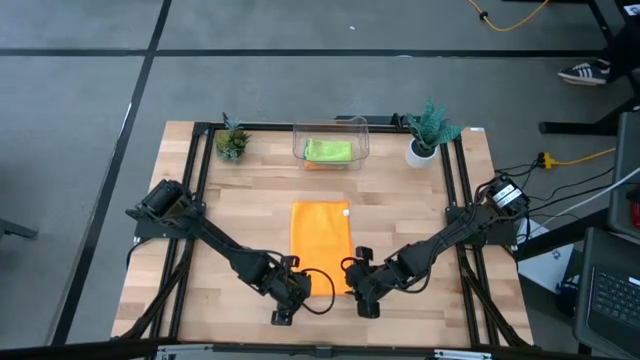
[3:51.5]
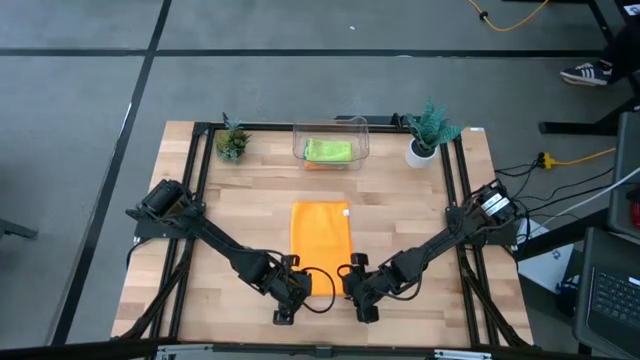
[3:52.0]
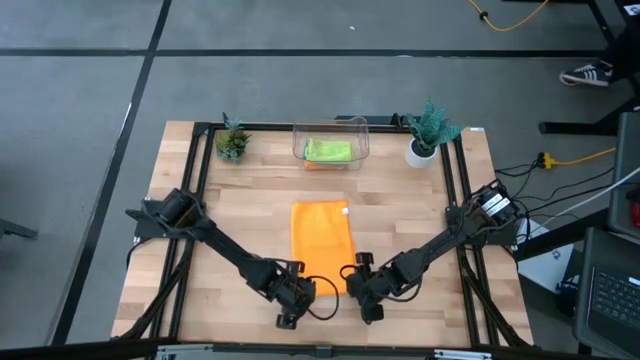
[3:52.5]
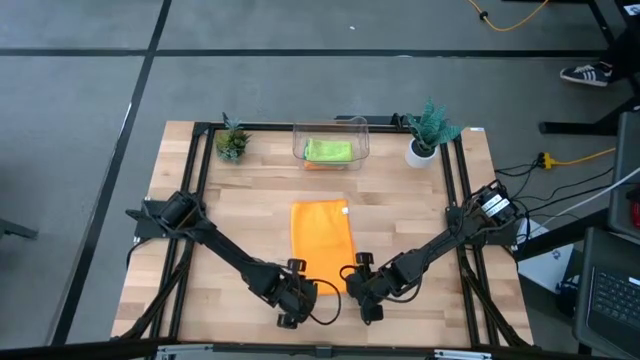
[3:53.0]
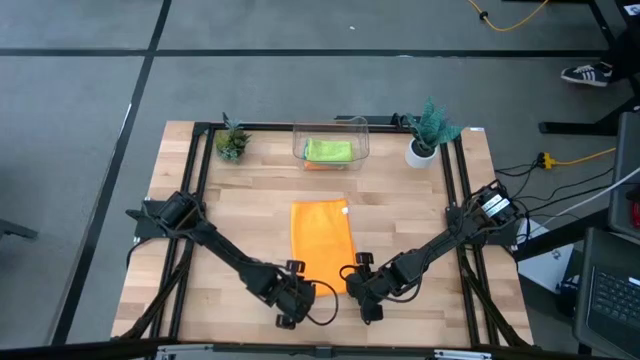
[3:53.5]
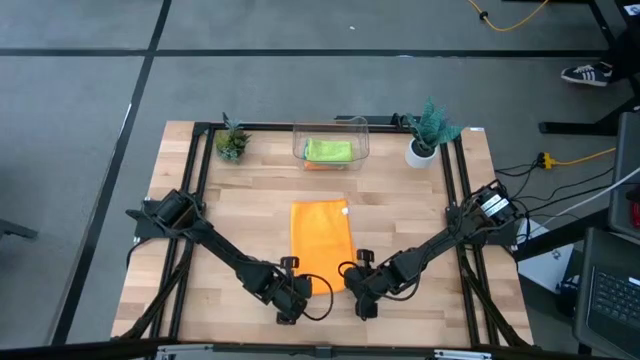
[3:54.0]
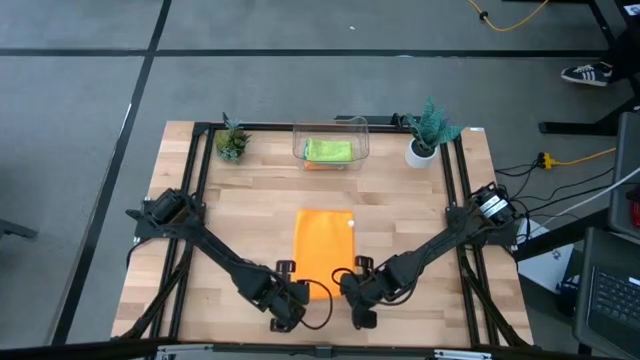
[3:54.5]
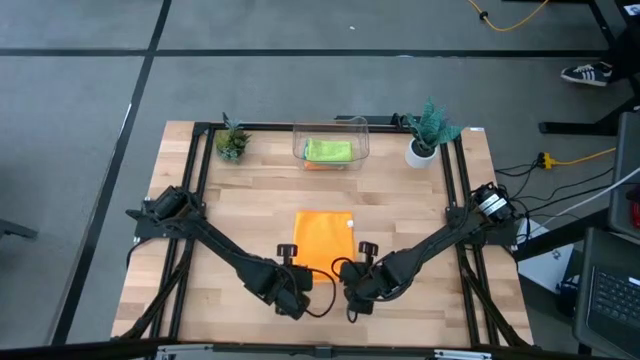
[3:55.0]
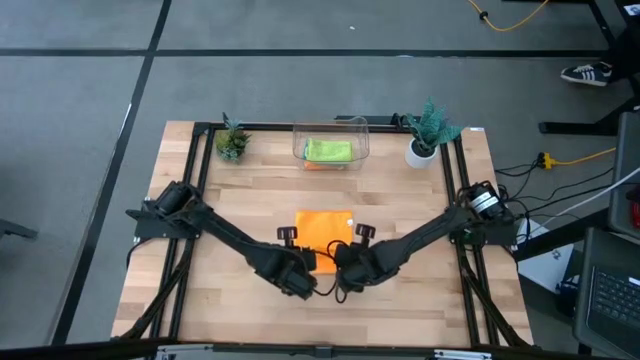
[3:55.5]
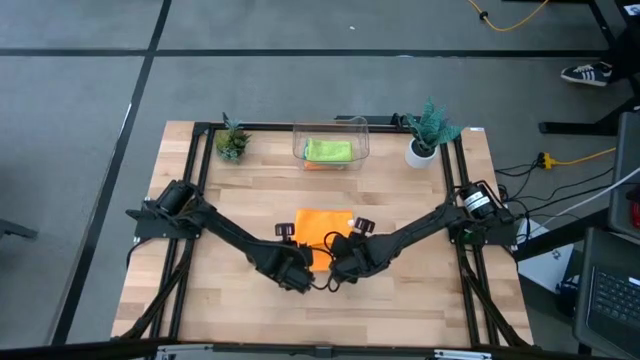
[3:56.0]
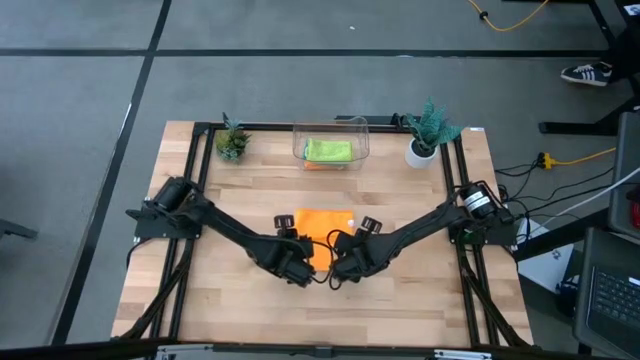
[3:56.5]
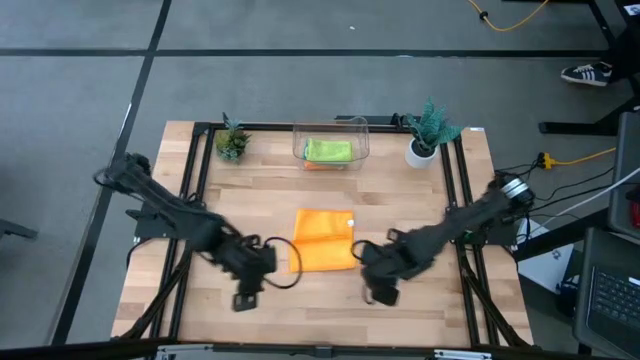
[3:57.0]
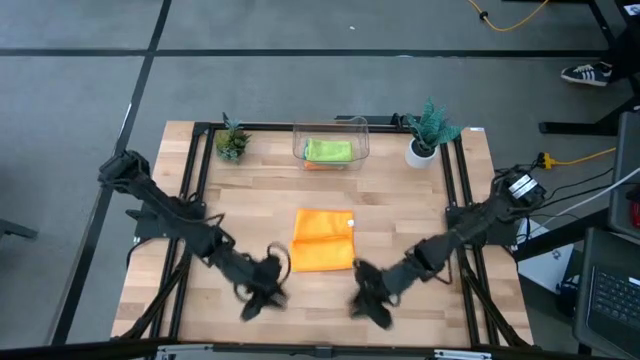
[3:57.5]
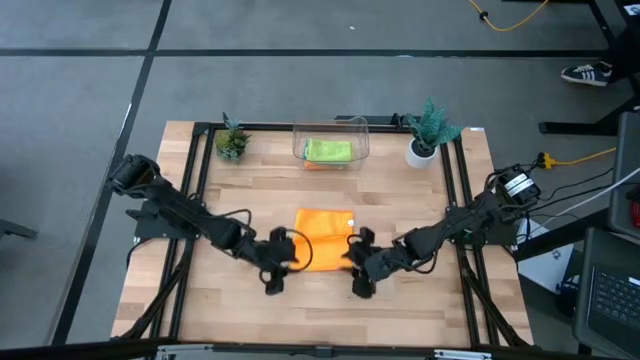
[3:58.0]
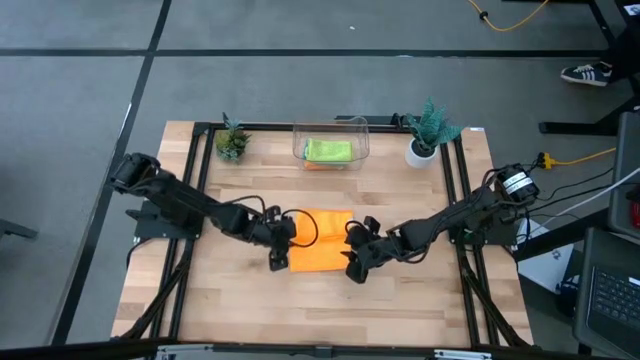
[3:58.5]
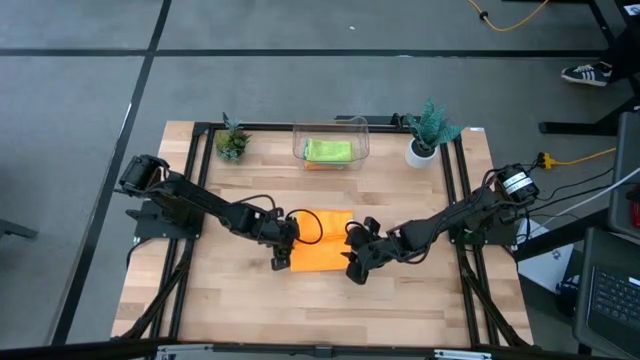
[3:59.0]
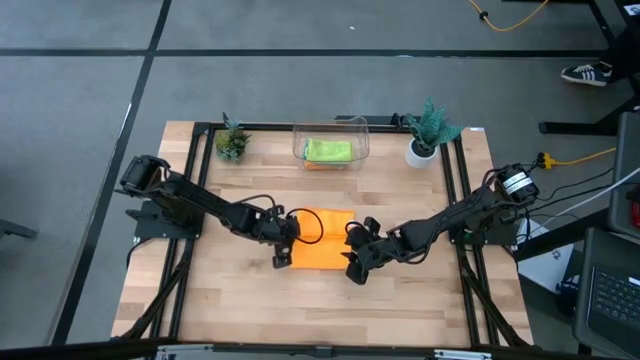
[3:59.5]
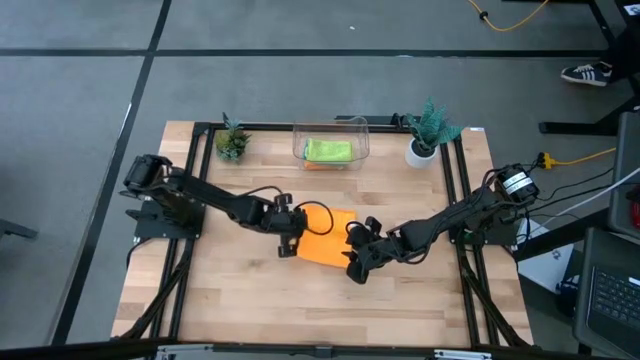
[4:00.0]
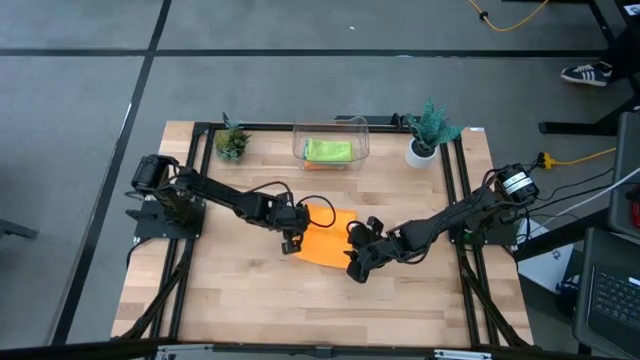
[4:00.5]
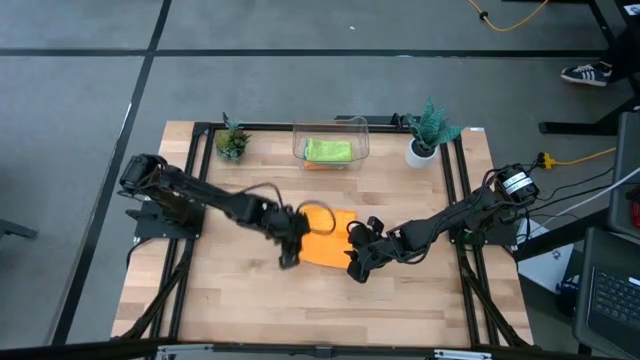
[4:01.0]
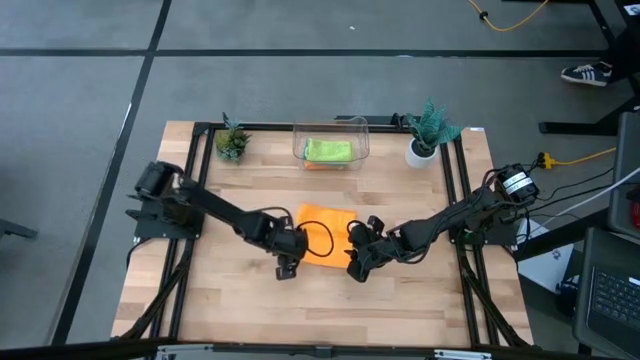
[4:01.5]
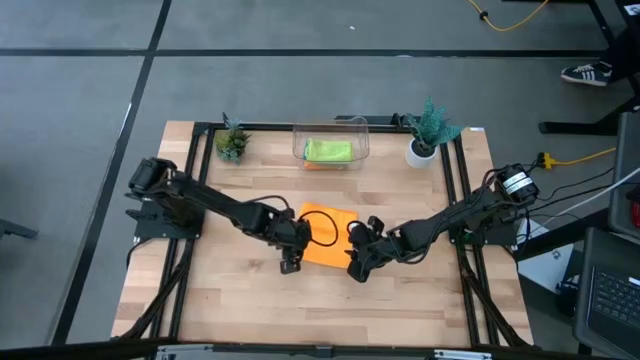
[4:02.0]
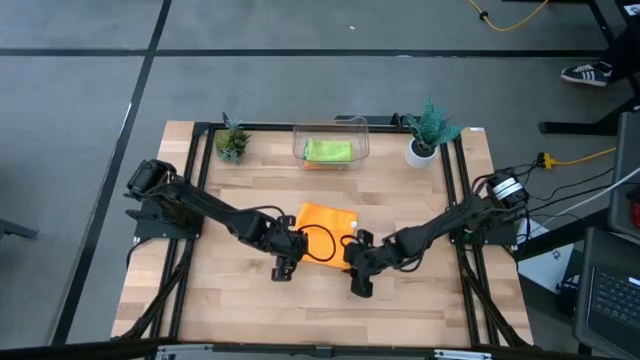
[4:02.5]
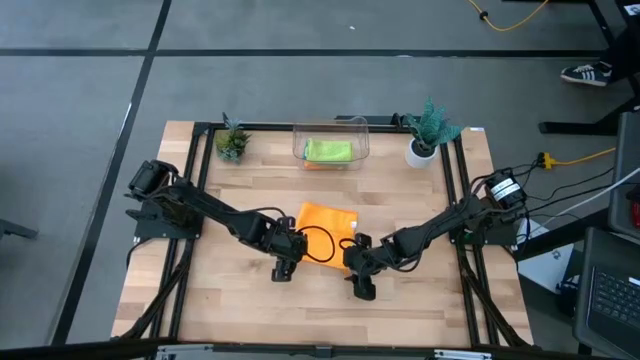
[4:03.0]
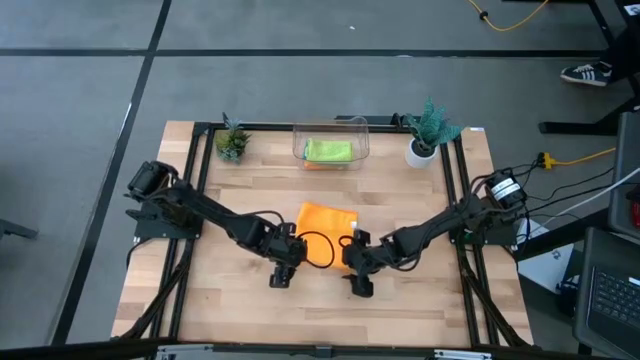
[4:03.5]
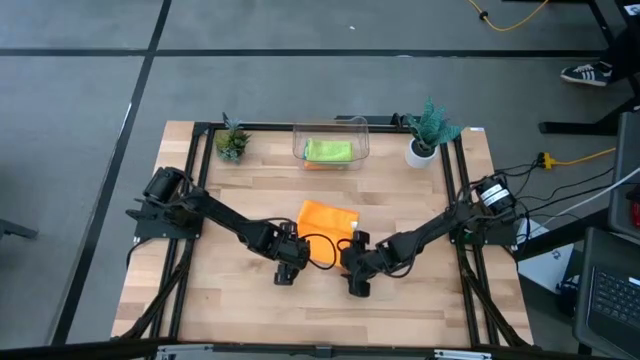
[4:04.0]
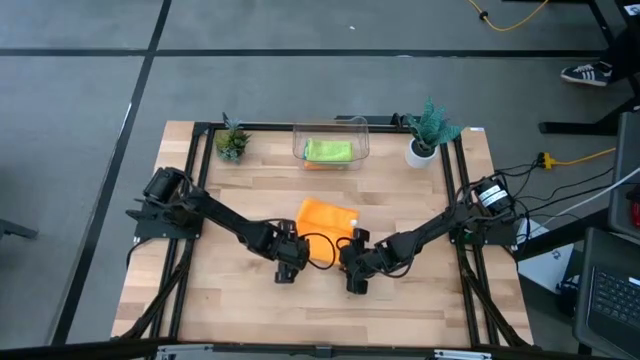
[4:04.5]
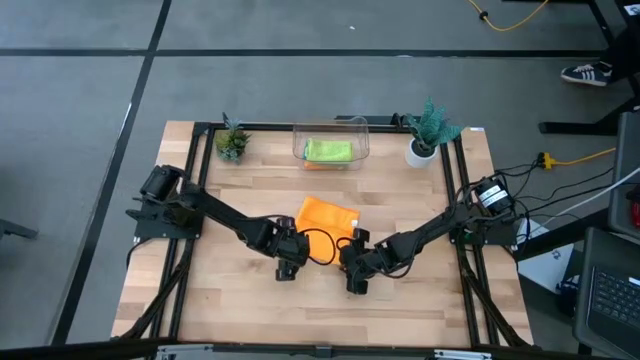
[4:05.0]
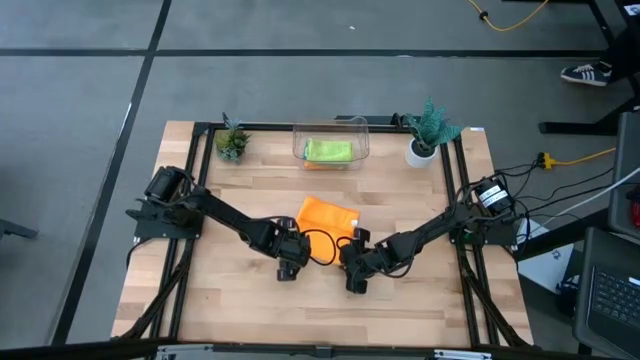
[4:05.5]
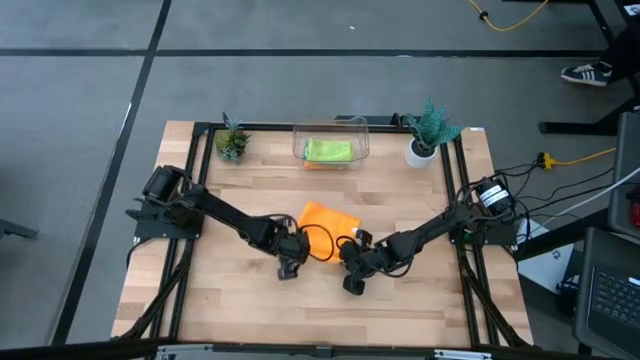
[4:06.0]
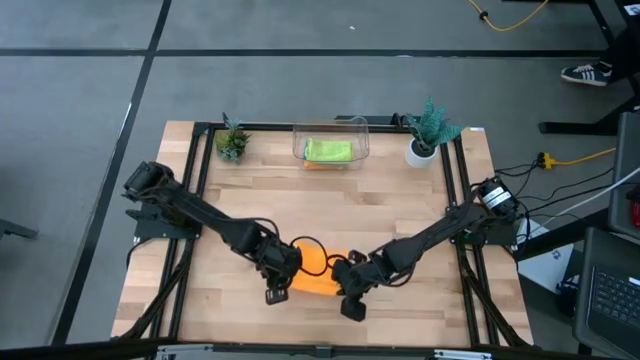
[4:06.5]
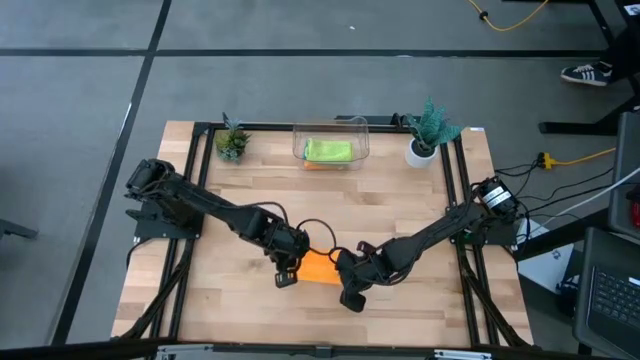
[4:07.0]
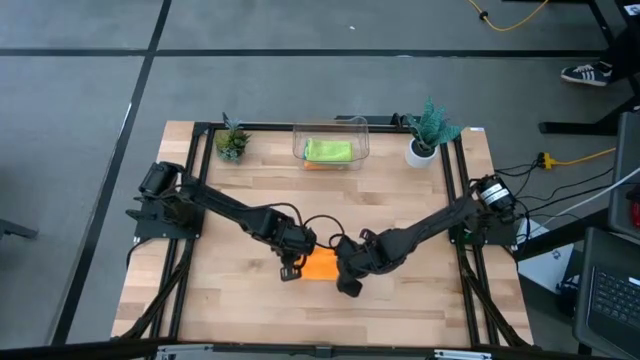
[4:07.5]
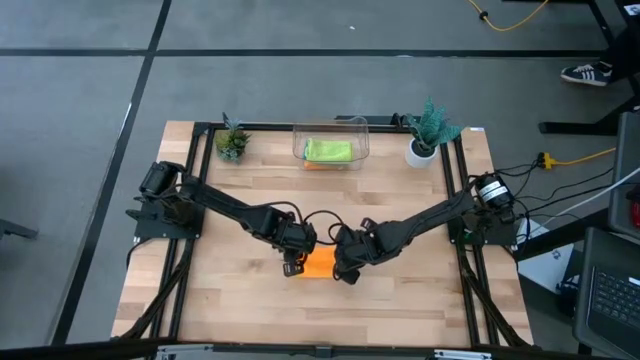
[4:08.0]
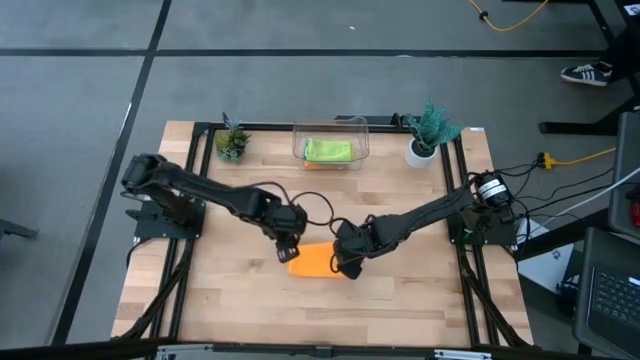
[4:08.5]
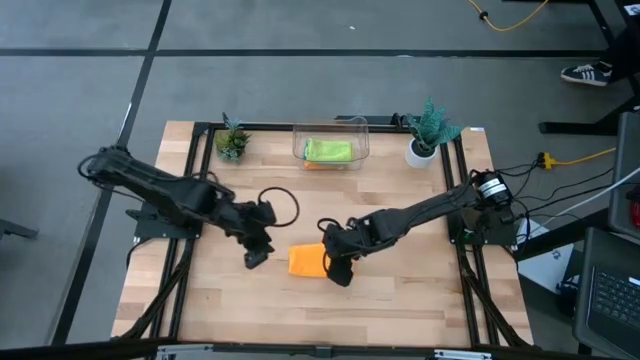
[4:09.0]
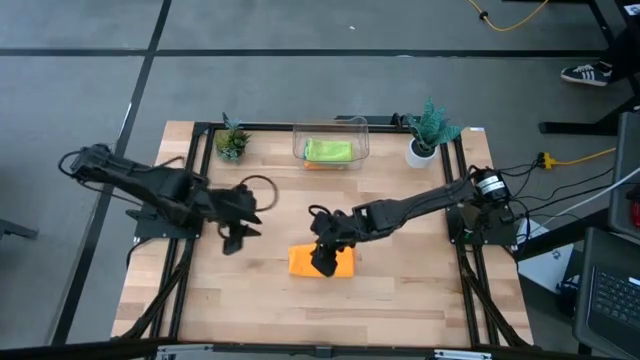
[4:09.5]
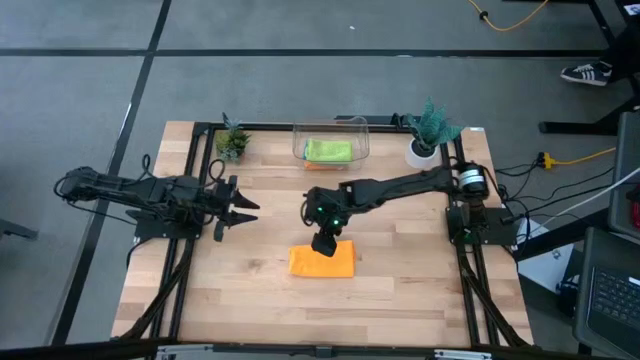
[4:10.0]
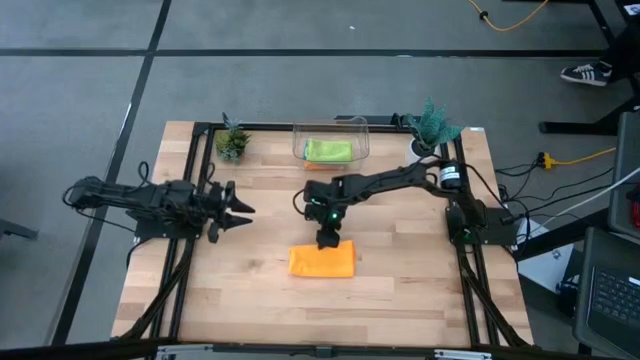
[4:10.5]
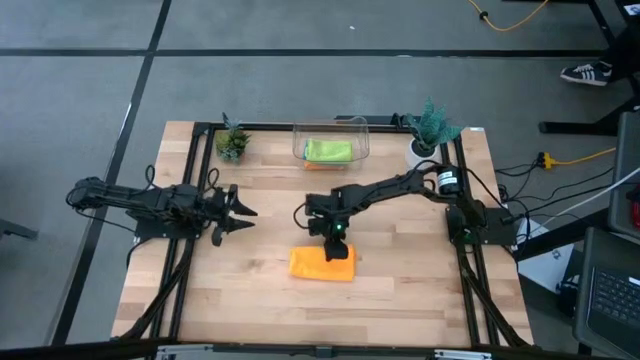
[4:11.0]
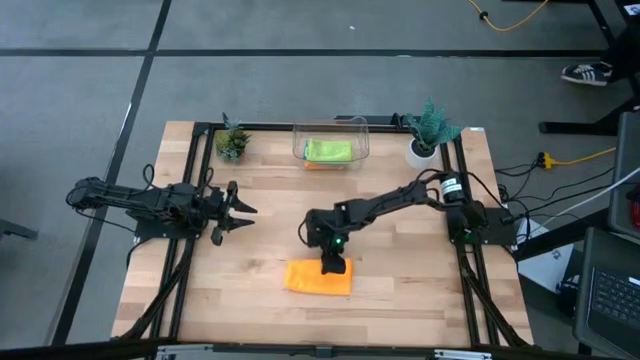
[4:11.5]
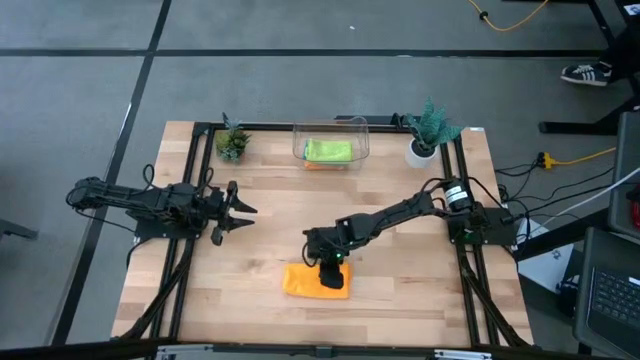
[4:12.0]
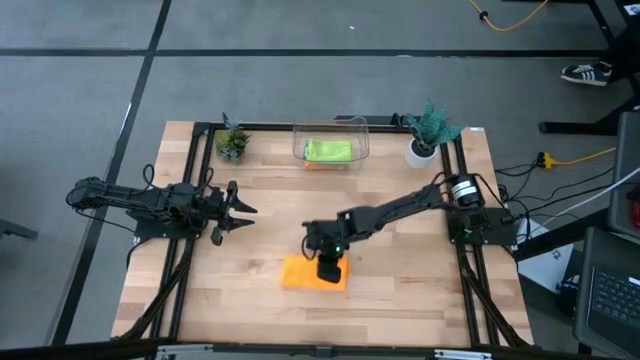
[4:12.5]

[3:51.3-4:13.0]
Task: Fold microfiber towels
Fold the orange towel
